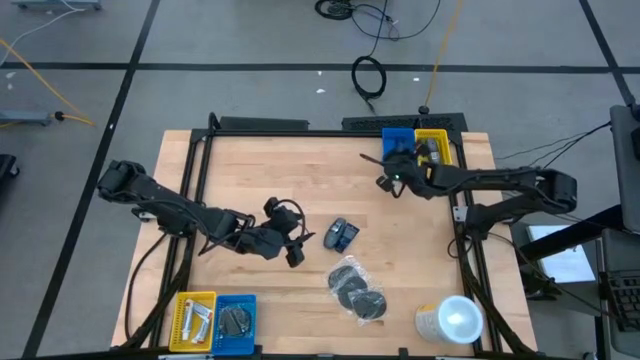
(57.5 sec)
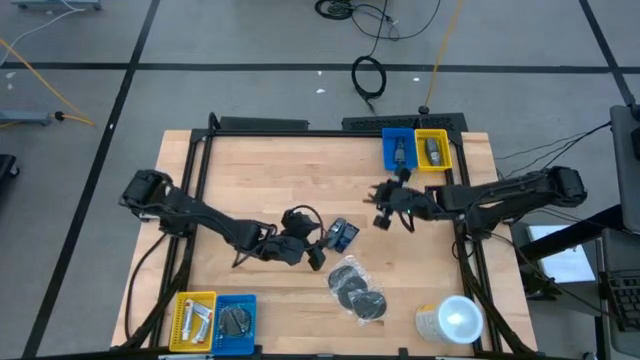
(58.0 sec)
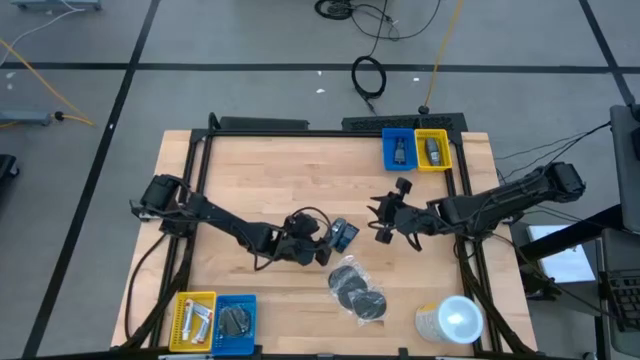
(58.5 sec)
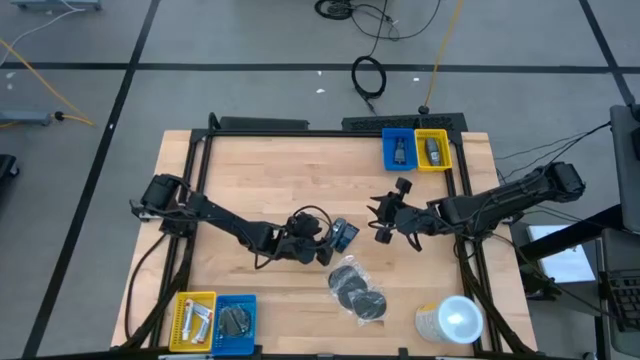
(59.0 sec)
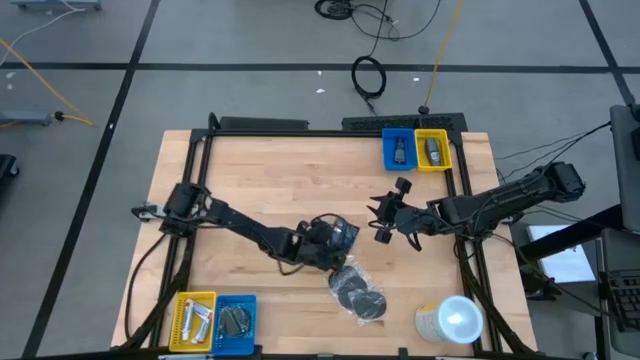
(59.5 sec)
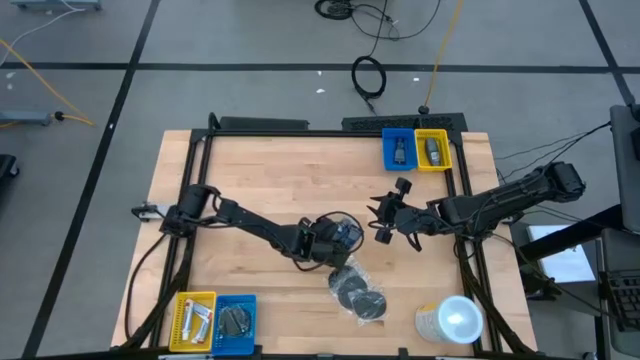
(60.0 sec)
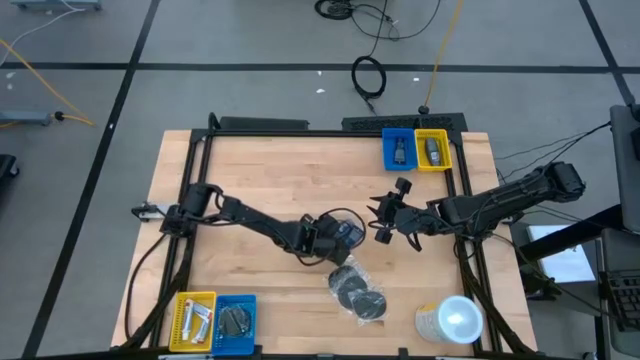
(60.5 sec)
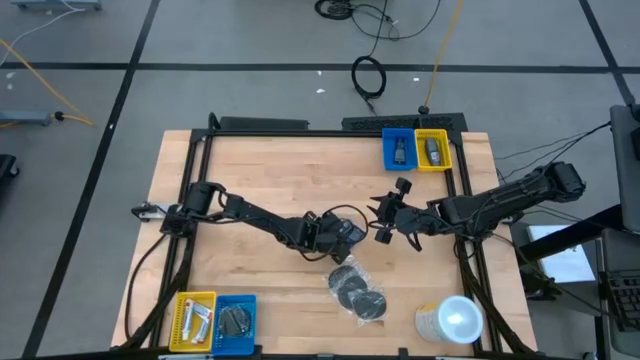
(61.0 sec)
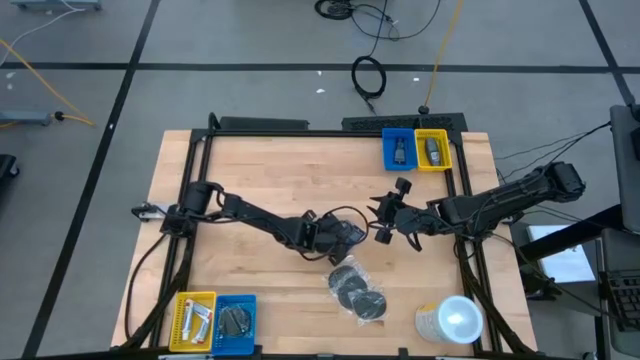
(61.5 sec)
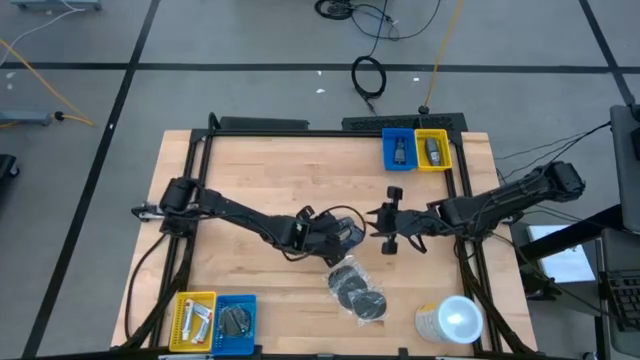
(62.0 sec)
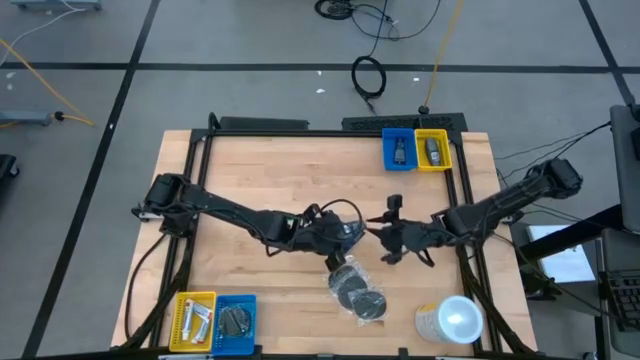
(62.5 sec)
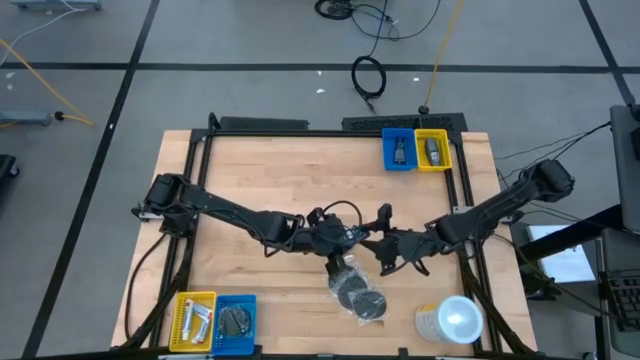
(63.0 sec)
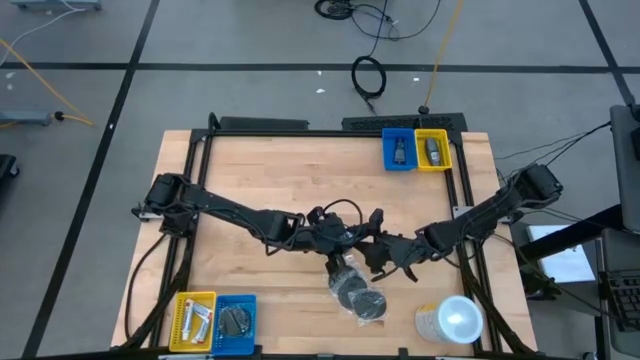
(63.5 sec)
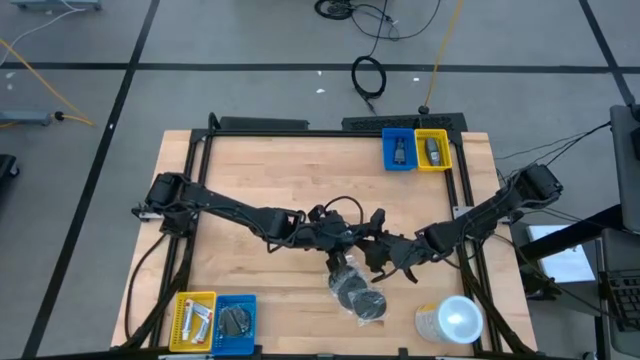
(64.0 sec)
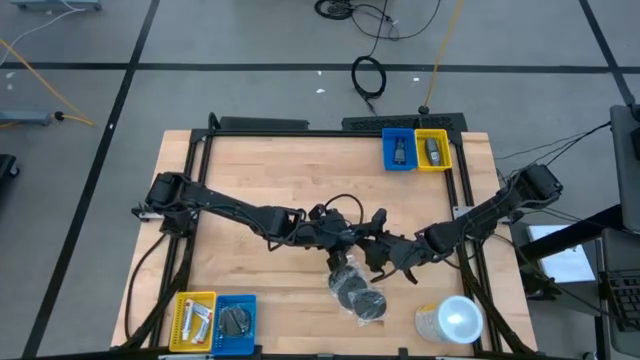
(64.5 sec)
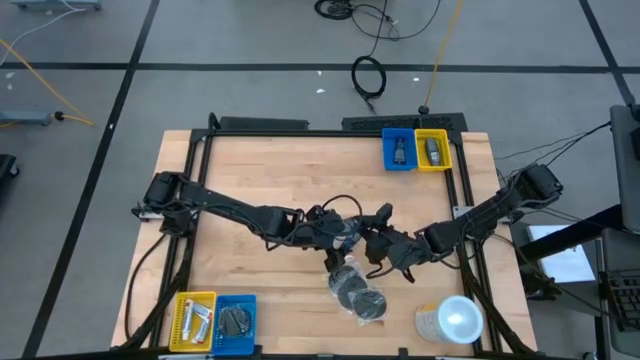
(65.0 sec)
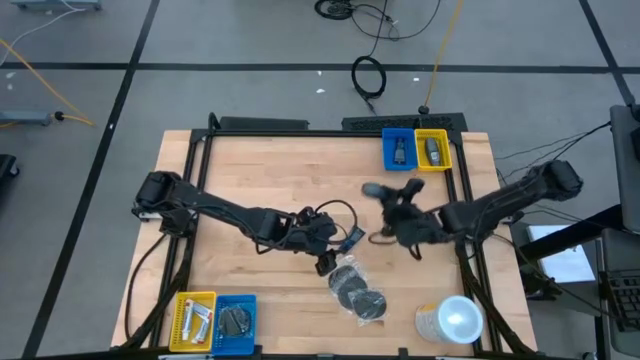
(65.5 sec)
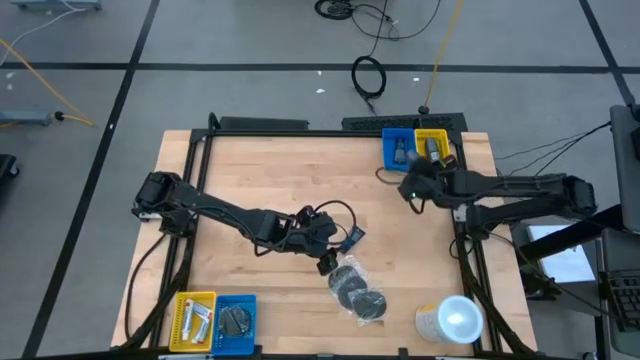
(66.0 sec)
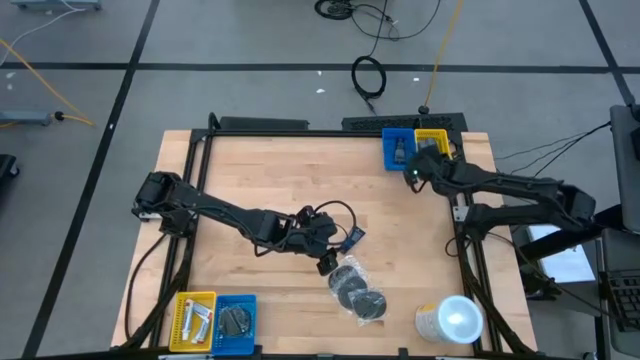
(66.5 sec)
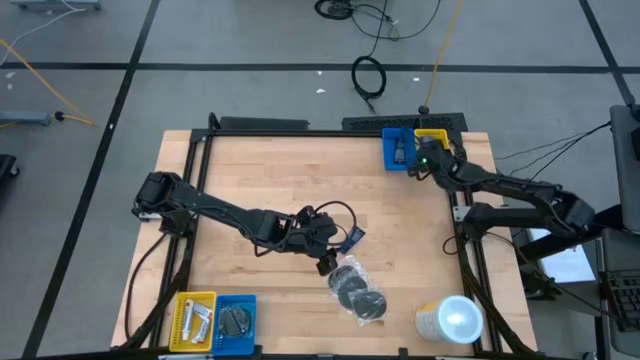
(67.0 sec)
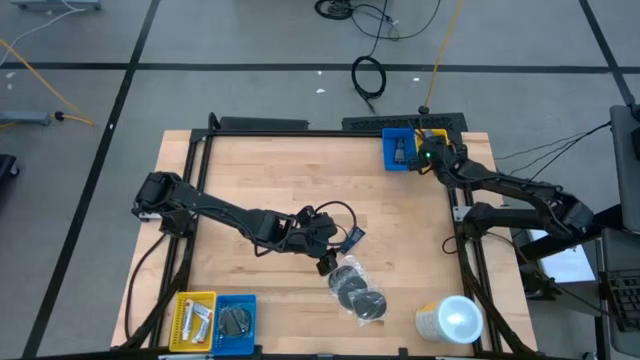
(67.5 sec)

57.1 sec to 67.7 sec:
Task: Pick & Place Travel size toiletries
Put the black deodorant into the top yellow bin

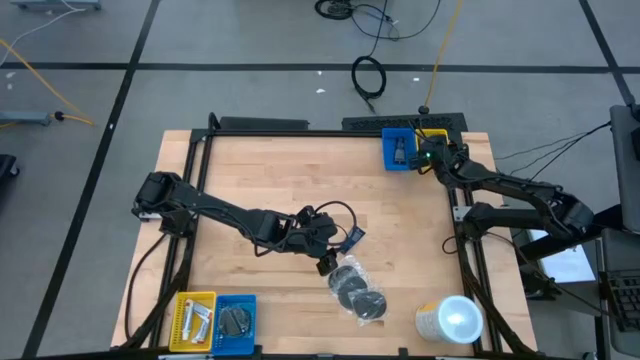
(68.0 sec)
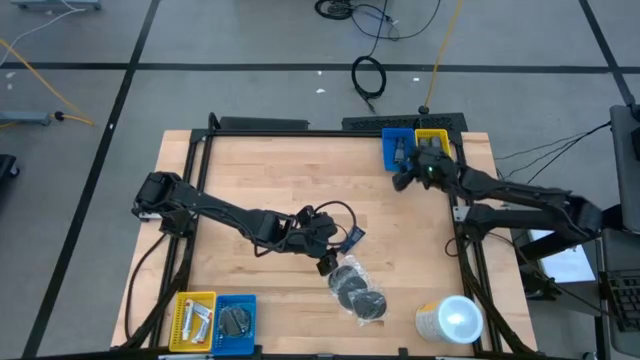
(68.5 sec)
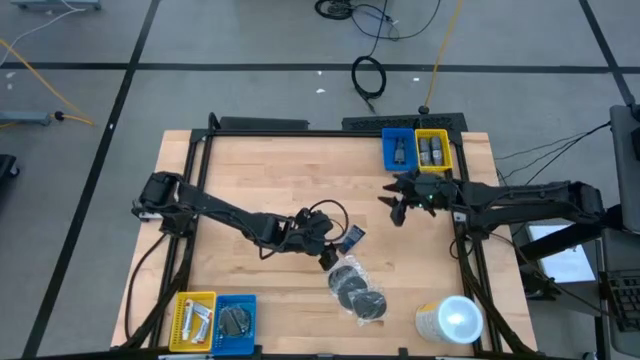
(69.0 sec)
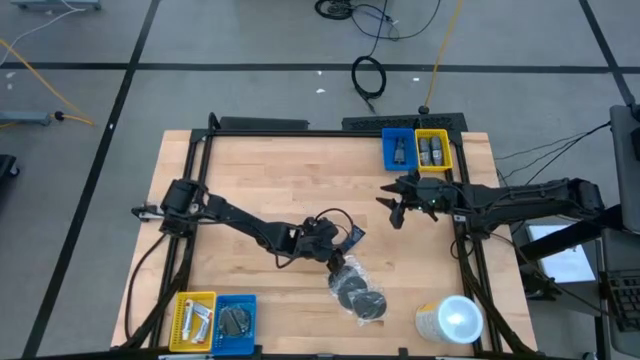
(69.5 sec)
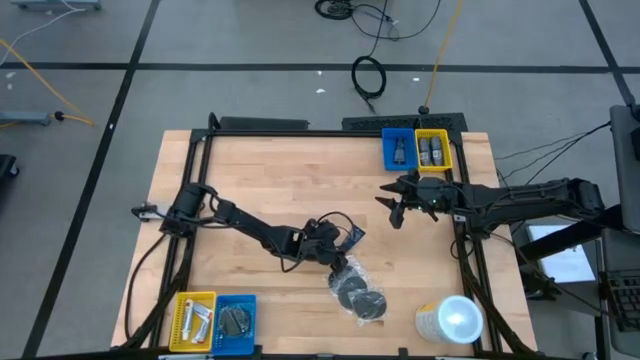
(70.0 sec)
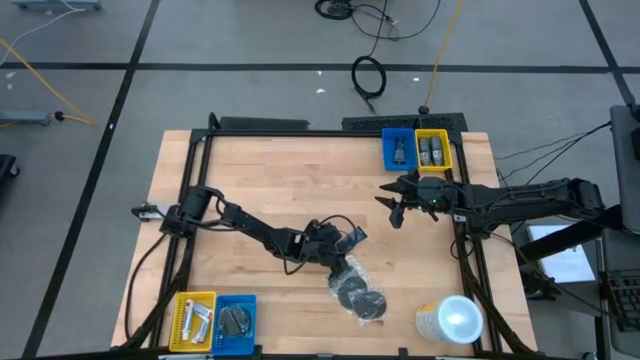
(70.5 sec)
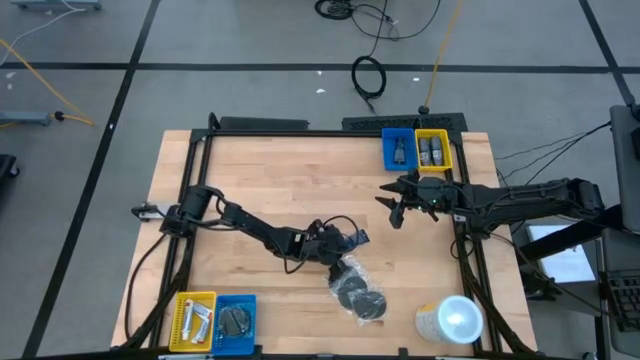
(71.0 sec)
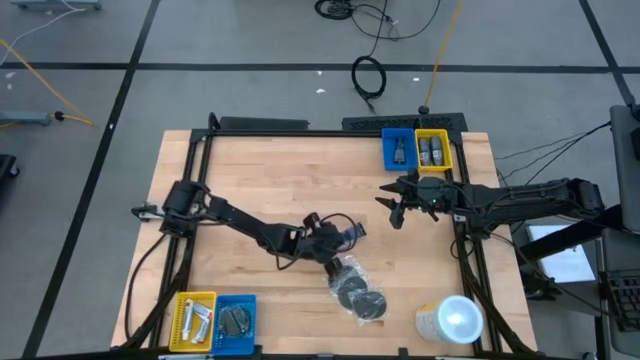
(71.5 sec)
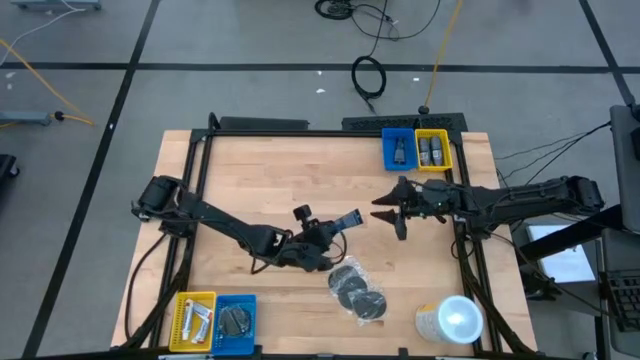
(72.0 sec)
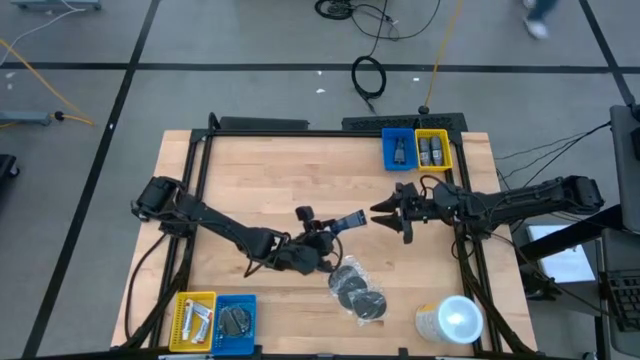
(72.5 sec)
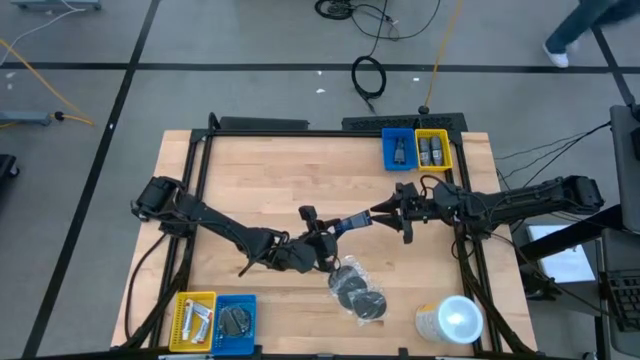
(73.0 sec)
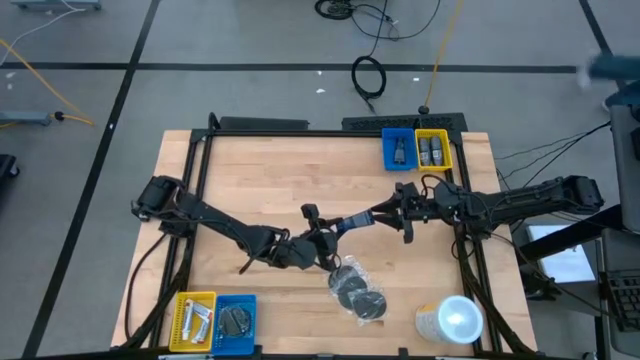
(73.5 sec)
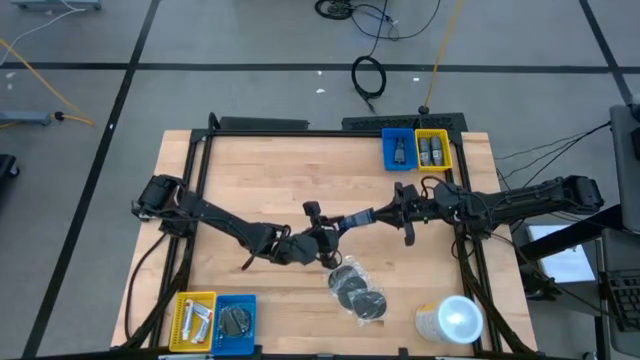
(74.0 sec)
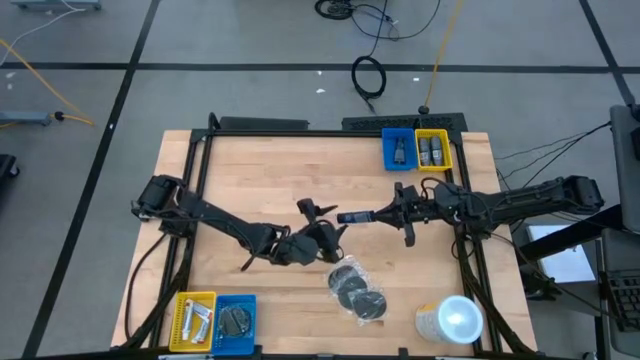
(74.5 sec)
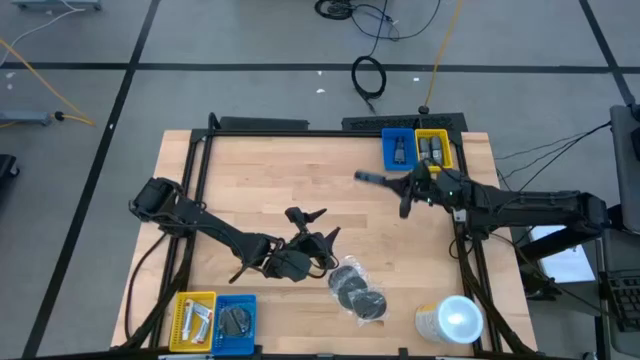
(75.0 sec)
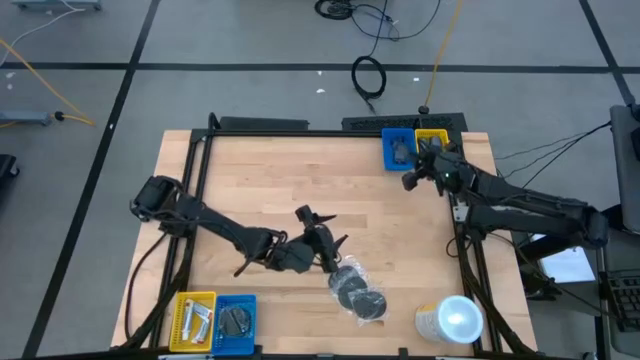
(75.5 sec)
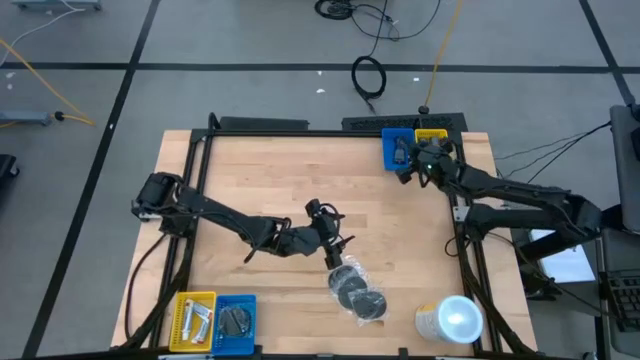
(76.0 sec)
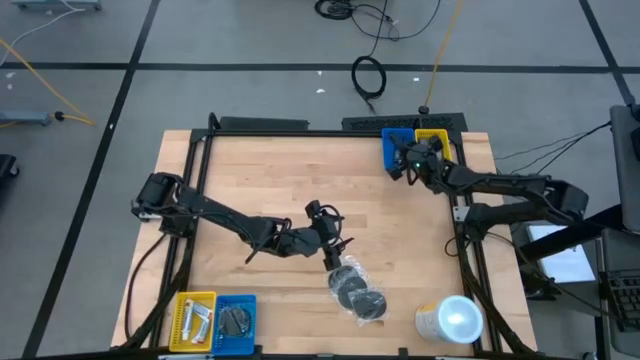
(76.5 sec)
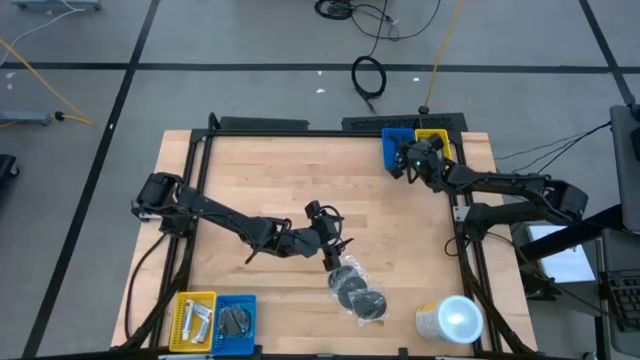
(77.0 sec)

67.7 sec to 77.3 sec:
Put the blue shave cream into the top blue bin

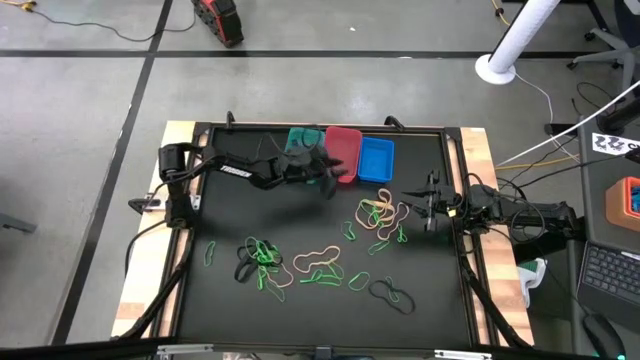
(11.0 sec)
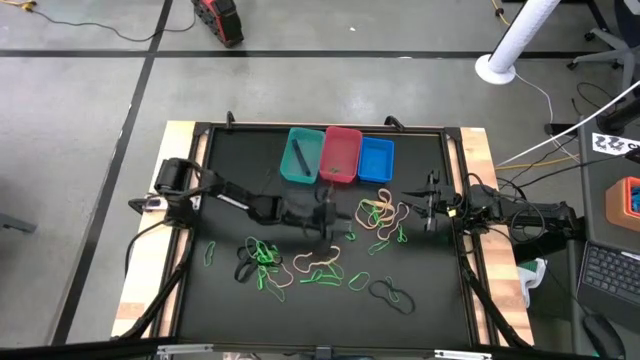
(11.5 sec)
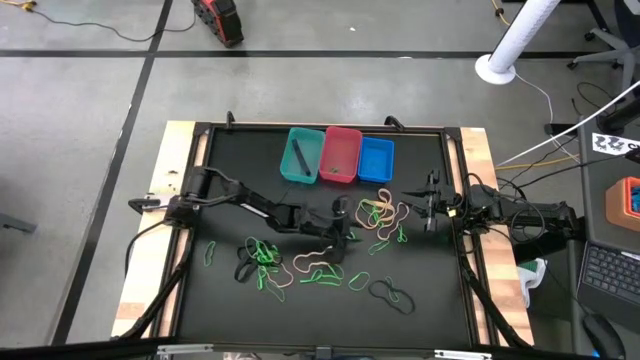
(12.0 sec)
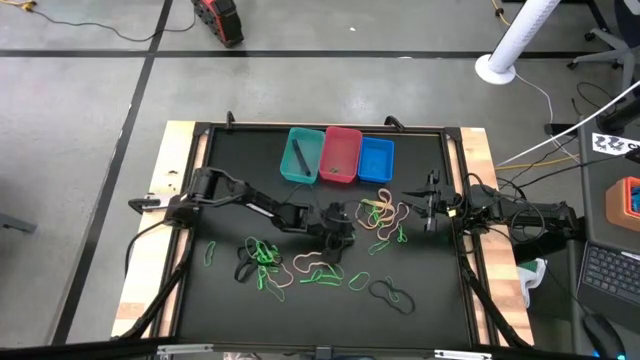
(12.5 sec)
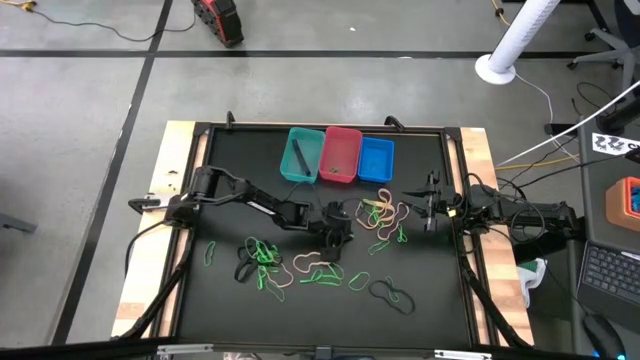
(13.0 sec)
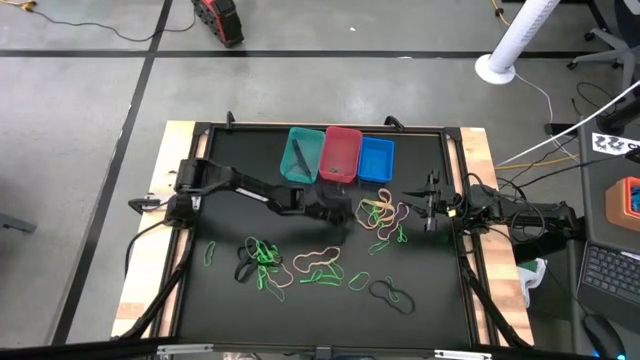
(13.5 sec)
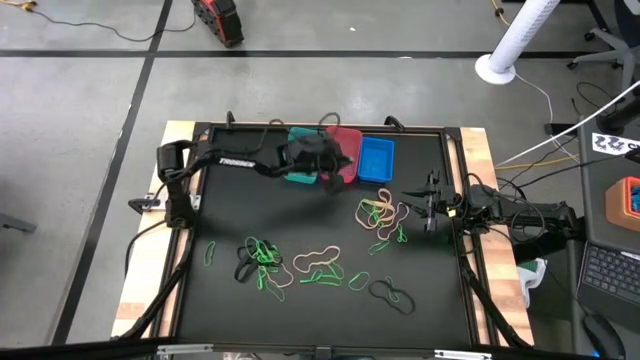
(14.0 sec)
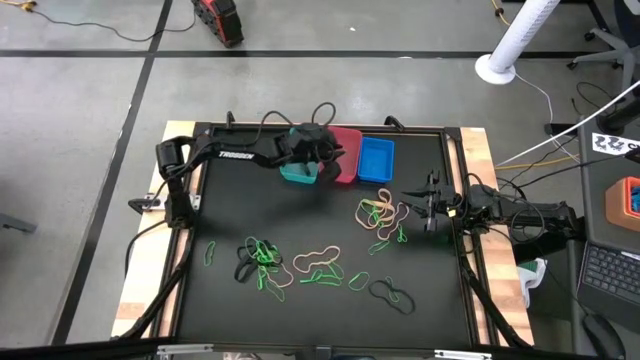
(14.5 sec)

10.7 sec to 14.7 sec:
Task: Sort rubber bands into baskets
Put the green rubber band into the pink bin
